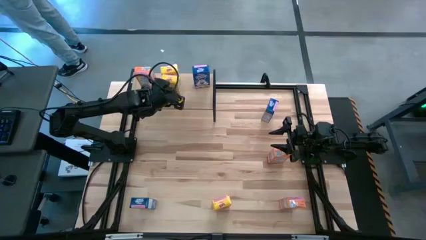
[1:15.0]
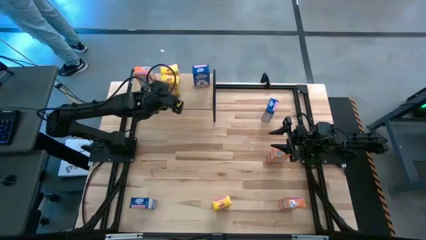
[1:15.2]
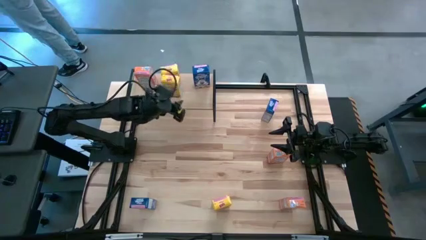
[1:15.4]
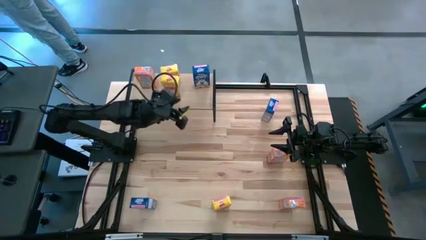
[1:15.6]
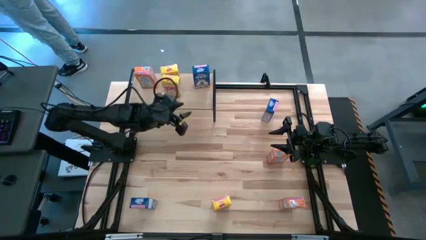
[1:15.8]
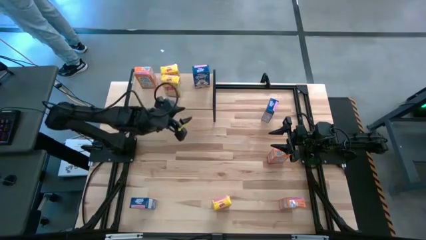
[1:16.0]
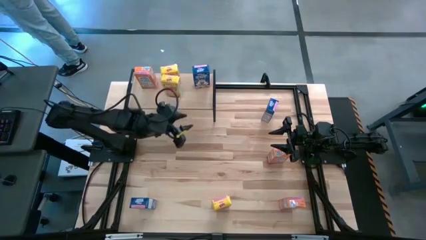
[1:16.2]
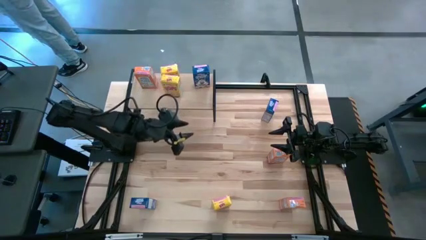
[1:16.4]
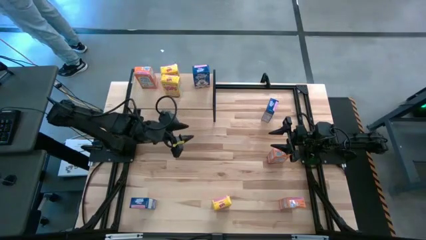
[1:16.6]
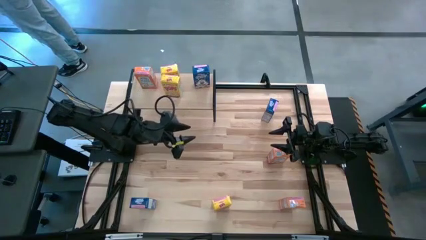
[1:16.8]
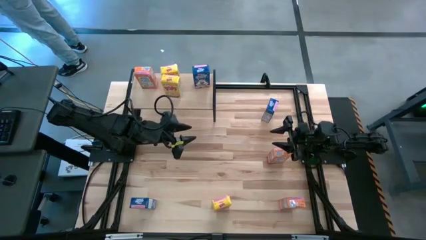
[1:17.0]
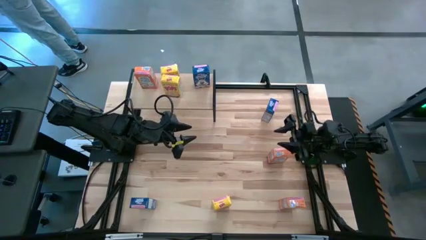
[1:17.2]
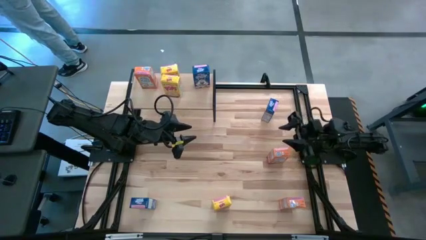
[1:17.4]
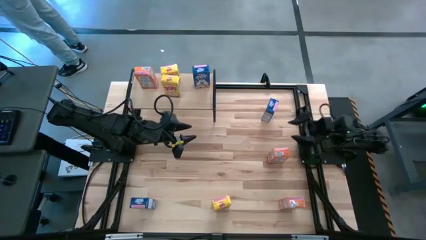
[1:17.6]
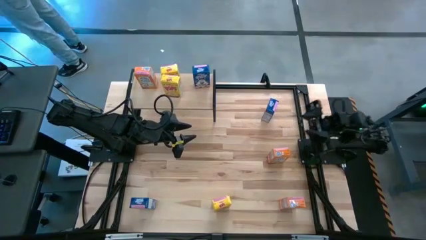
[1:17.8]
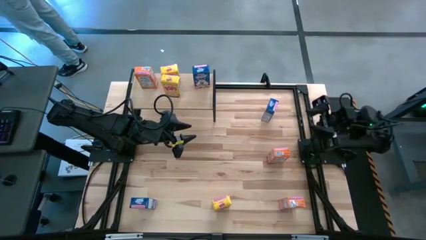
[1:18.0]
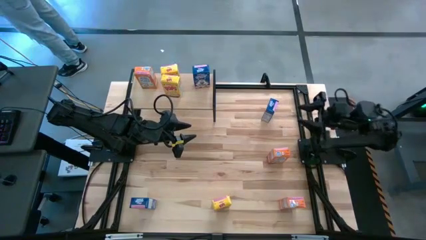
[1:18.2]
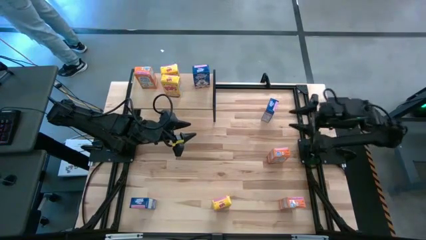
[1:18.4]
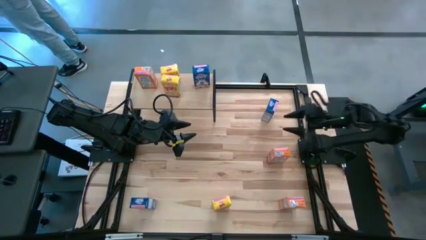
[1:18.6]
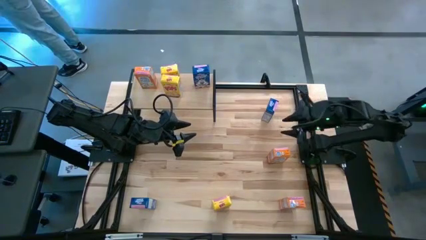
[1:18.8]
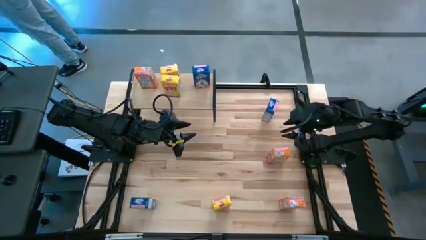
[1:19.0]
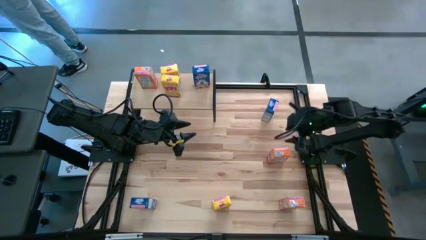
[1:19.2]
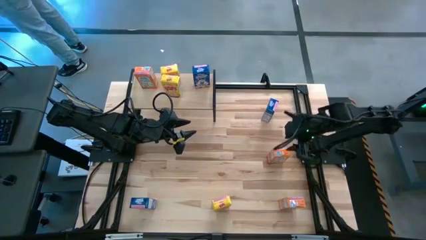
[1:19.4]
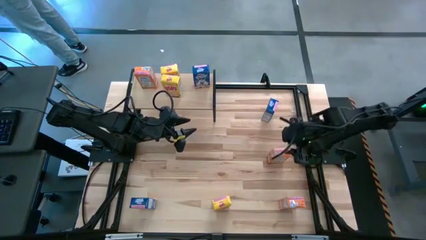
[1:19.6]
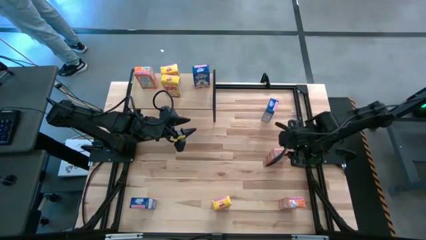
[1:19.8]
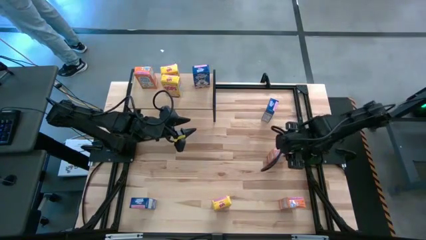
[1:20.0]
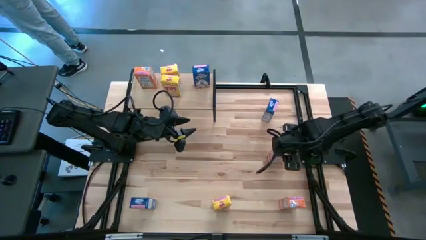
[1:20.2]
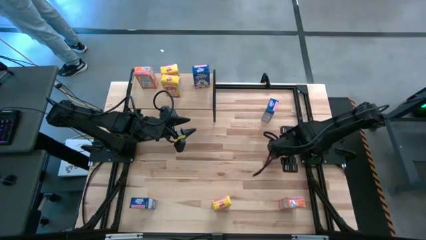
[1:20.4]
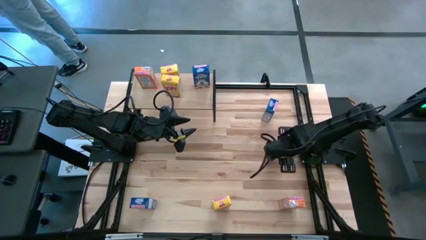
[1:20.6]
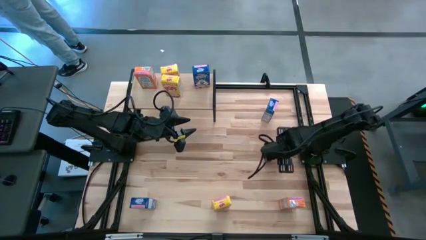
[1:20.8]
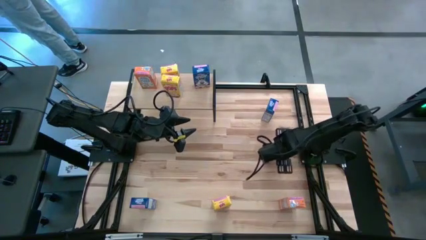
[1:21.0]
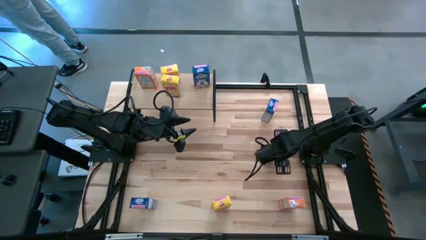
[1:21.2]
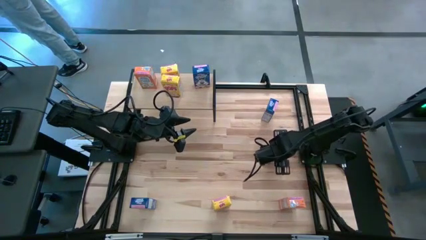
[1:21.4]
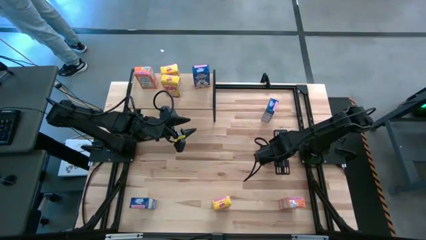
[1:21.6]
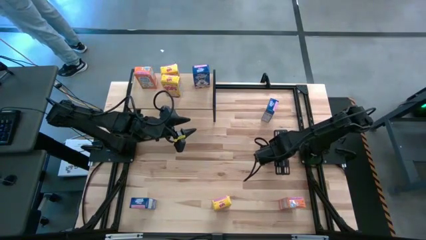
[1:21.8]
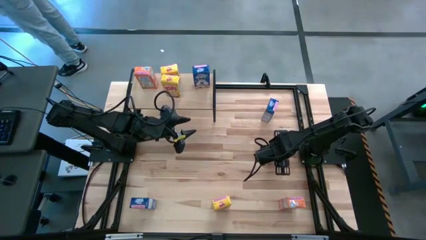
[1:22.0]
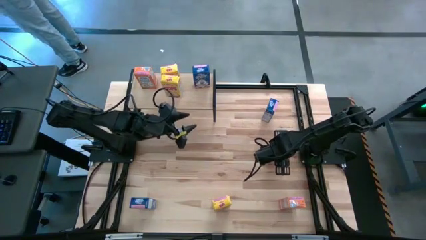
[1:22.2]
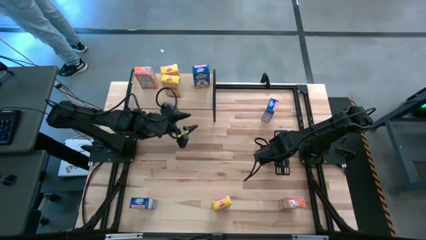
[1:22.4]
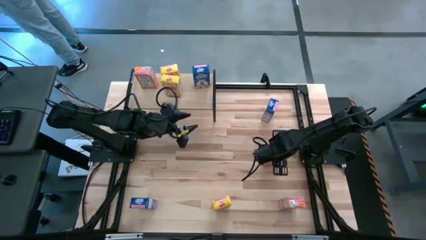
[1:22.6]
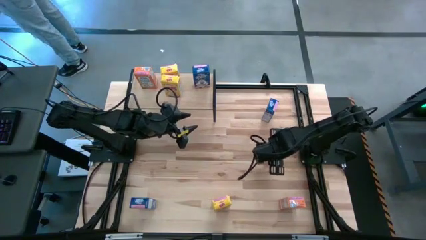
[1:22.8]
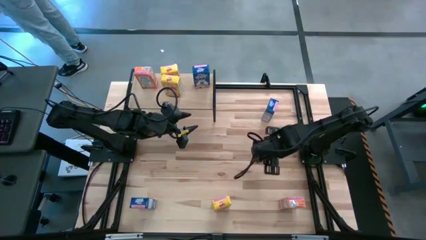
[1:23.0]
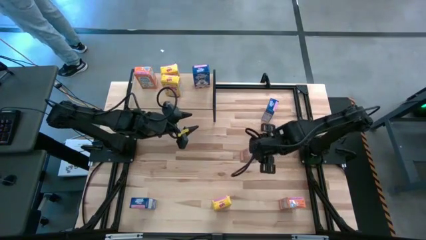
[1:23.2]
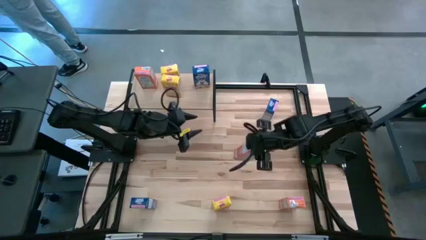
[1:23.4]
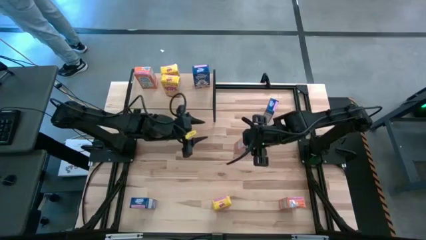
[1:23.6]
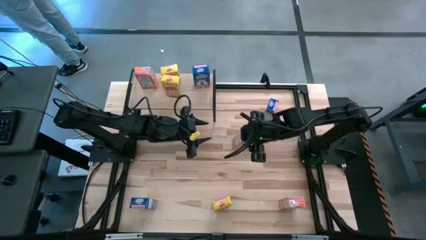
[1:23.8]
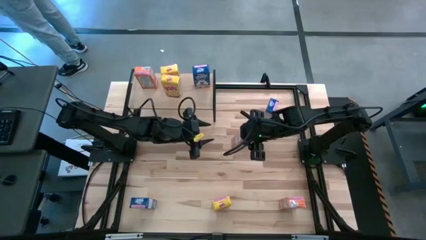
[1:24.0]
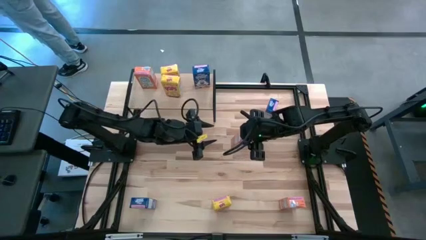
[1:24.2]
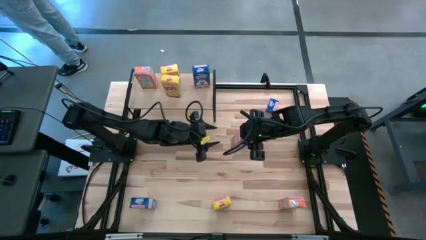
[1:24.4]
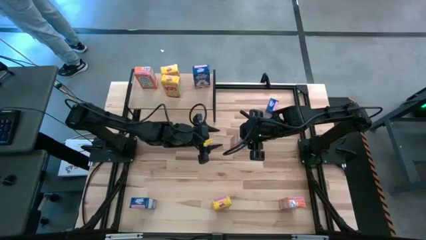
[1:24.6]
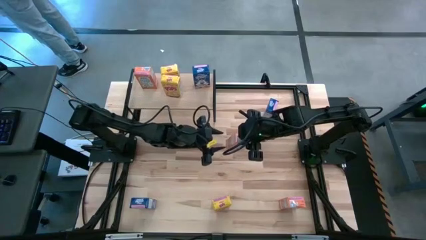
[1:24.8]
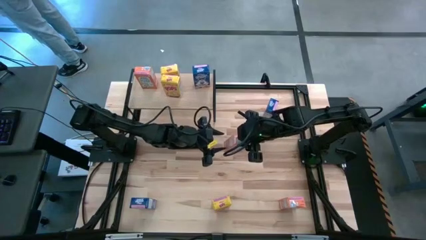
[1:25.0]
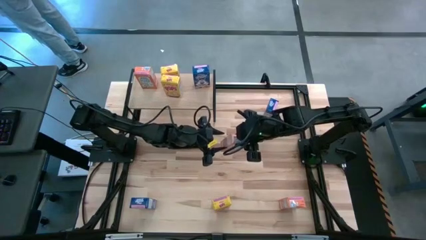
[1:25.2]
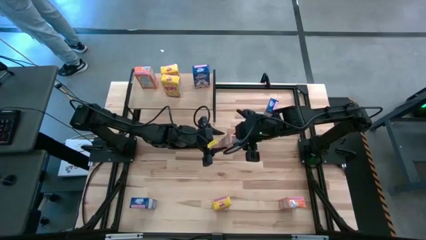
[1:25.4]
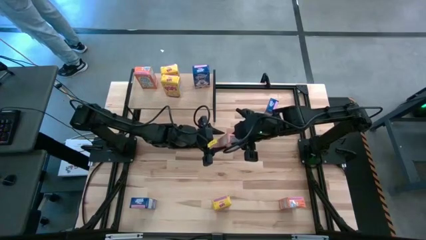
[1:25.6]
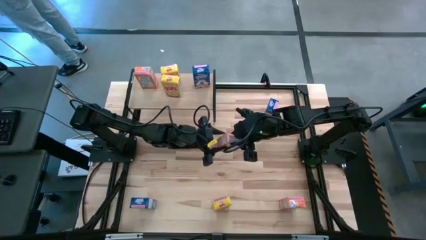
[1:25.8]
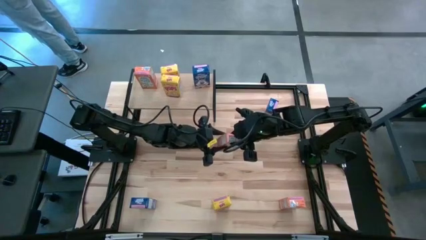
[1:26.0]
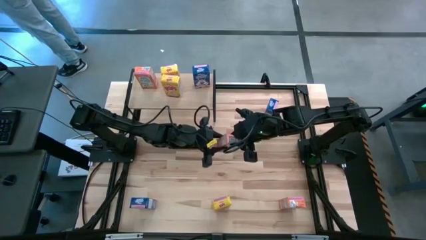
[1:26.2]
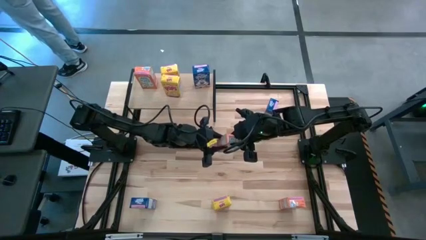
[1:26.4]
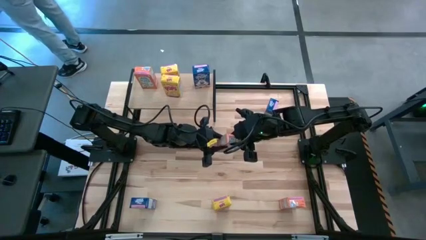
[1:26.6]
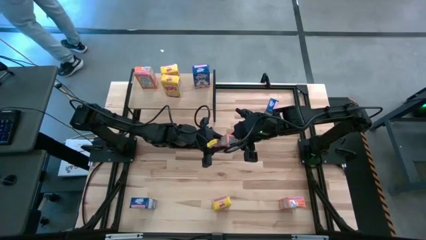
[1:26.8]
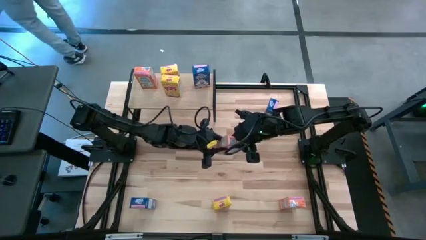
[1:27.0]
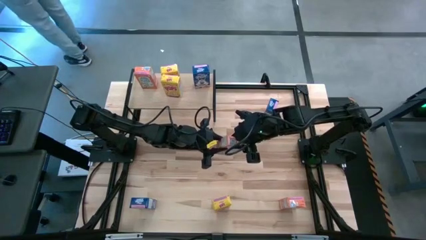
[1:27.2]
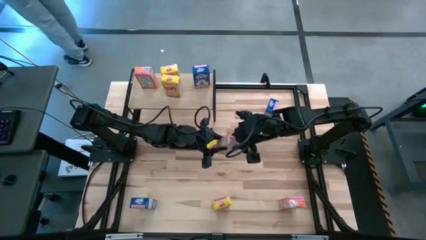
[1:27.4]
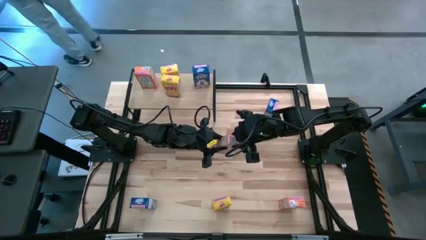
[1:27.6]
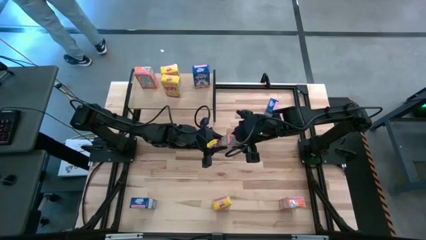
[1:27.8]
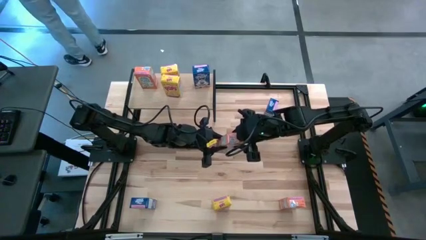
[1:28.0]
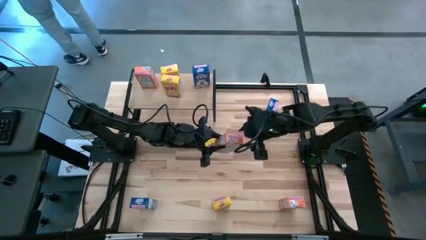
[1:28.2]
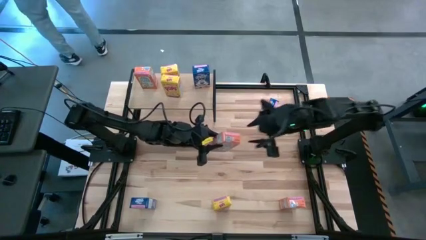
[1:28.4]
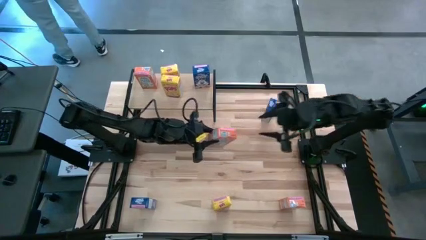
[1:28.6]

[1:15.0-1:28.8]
Task: Stack cereal on shelf
Put the top orange cereal box on the shelf aligned with the other orange cereal box
